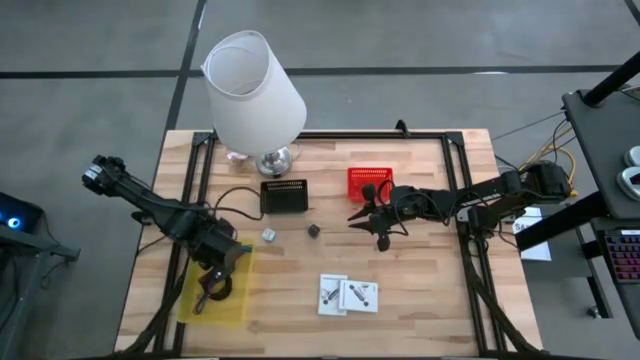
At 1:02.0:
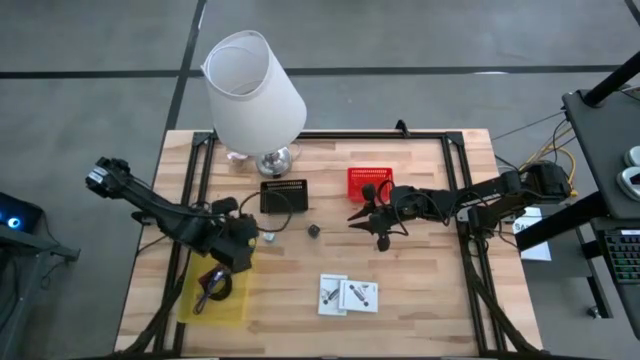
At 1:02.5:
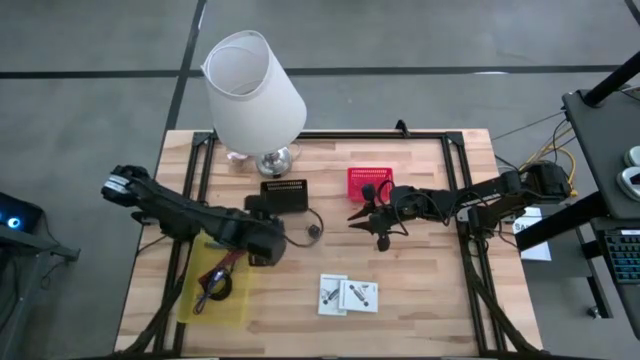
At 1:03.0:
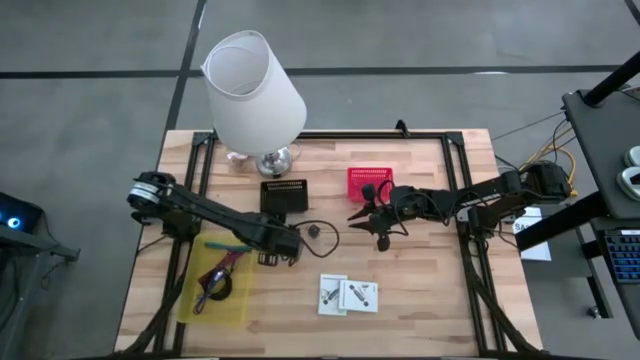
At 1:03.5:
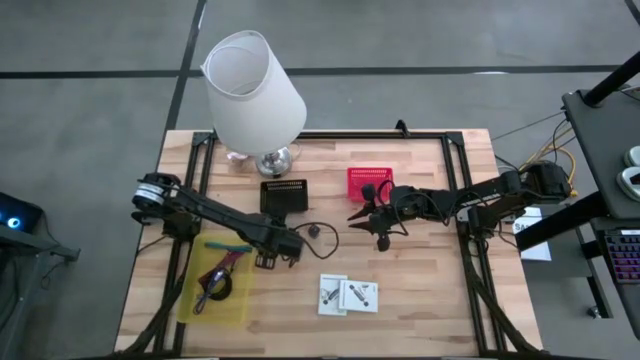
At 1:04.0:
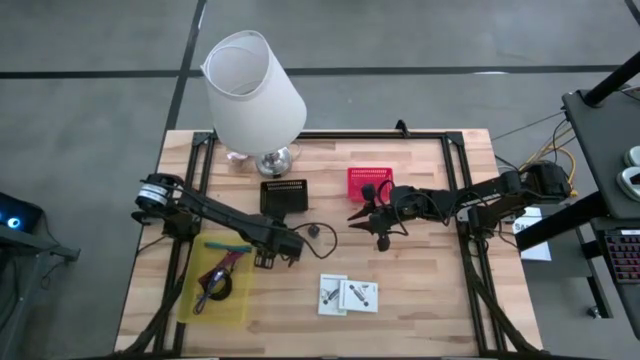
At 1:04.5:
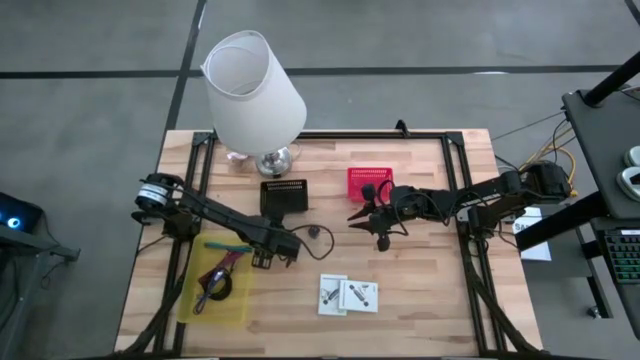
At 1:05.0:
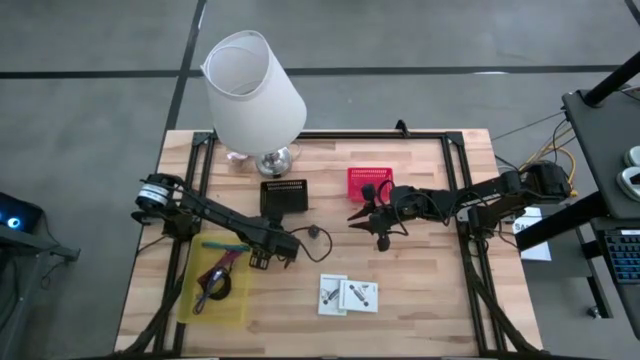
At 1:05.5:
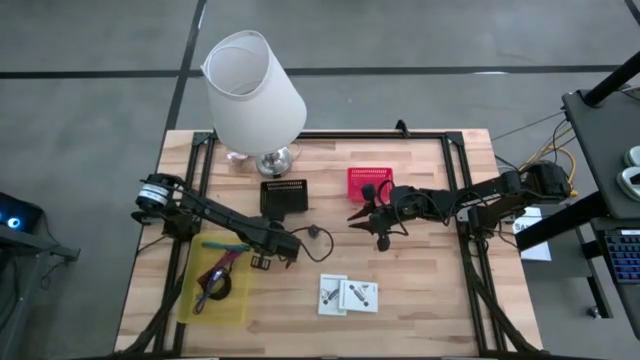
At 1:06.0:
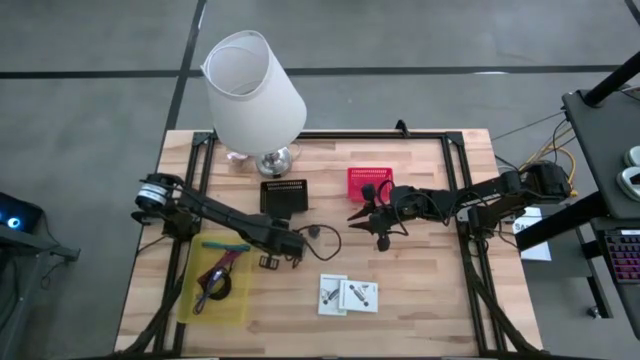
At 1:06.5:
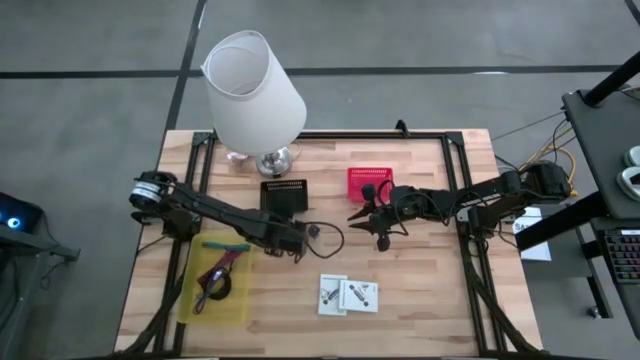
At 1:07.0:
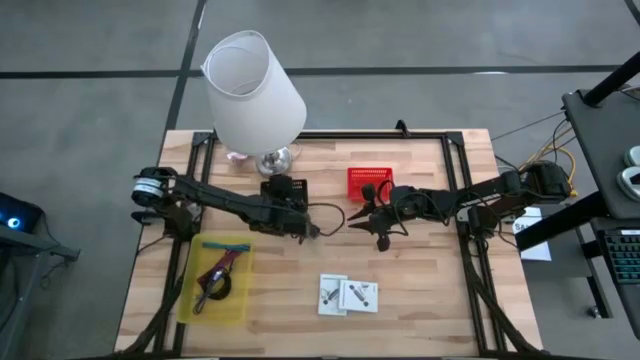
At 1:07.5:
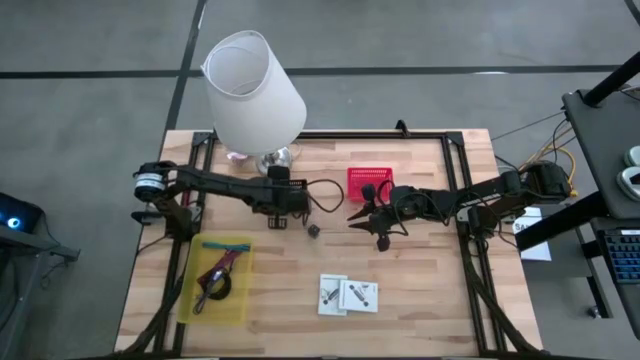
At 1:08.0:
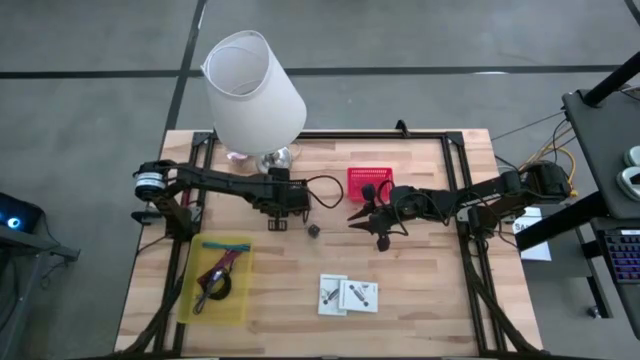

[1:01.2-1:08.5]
Task: Pick and place items into bin
Put the blue charger adapter into the black bin

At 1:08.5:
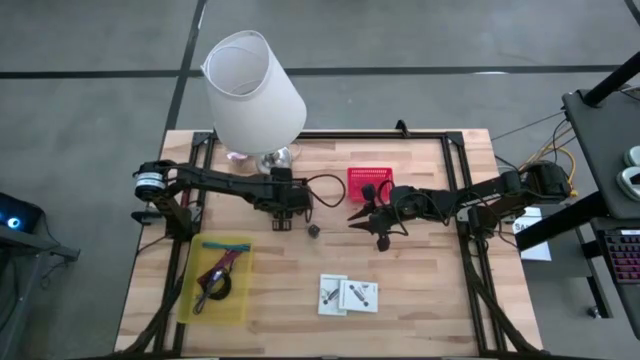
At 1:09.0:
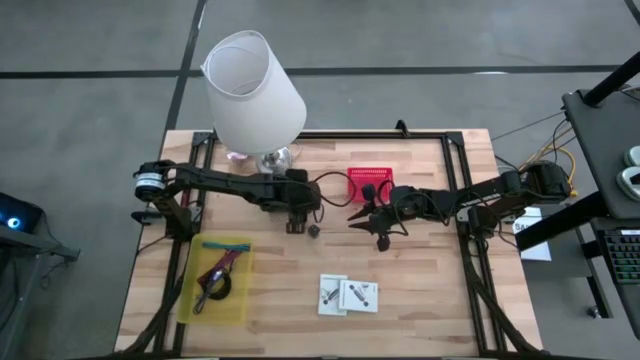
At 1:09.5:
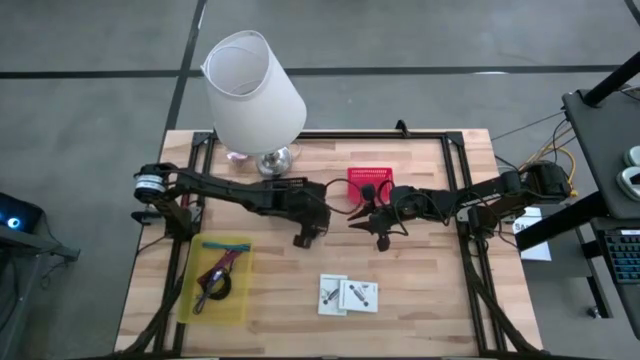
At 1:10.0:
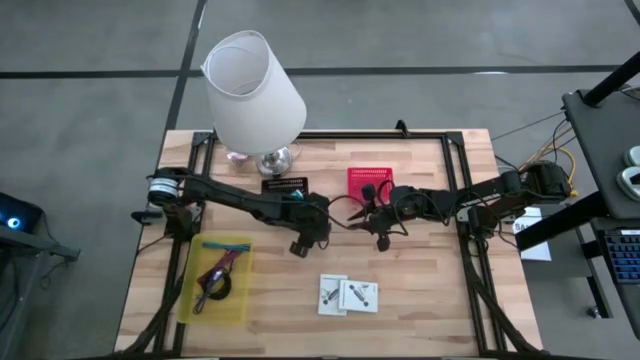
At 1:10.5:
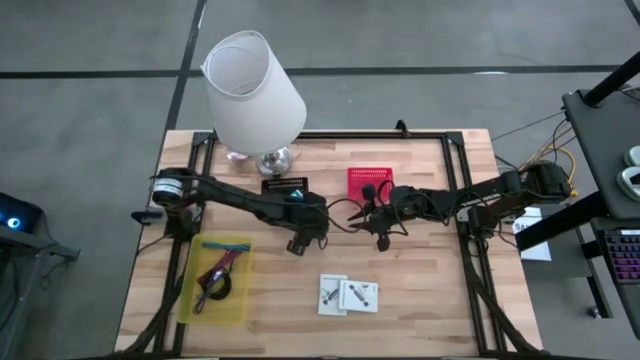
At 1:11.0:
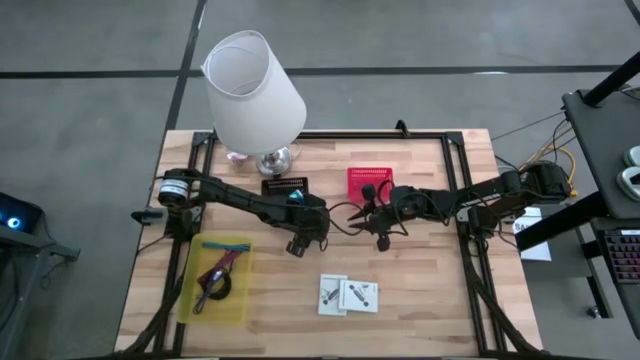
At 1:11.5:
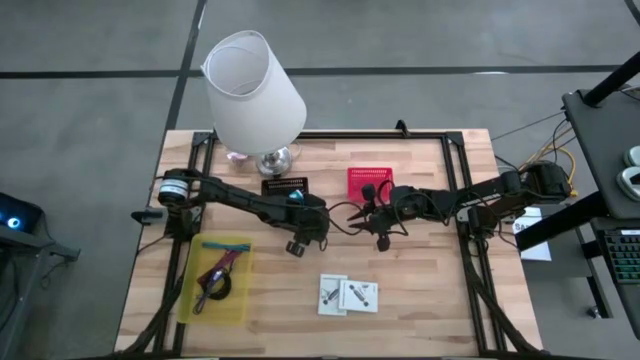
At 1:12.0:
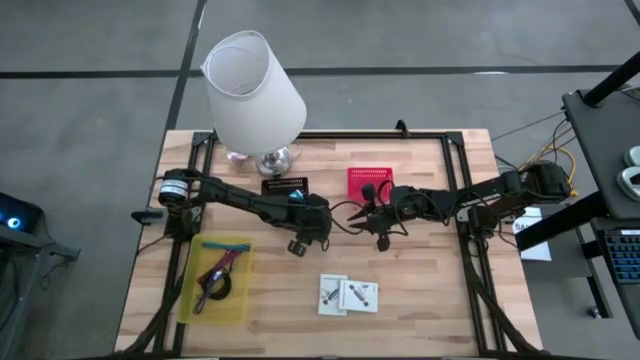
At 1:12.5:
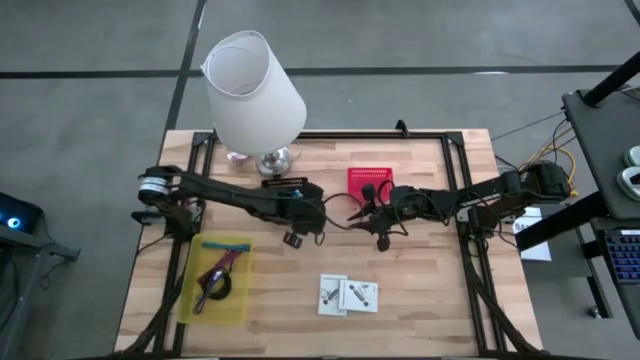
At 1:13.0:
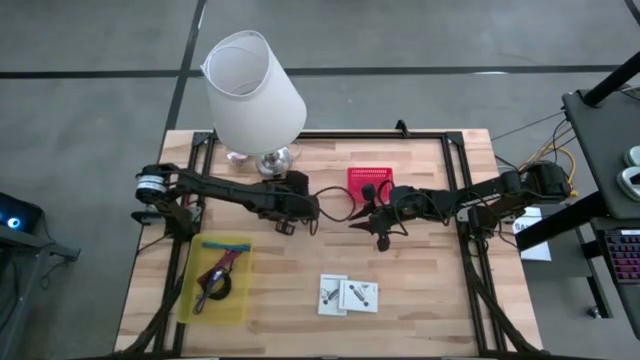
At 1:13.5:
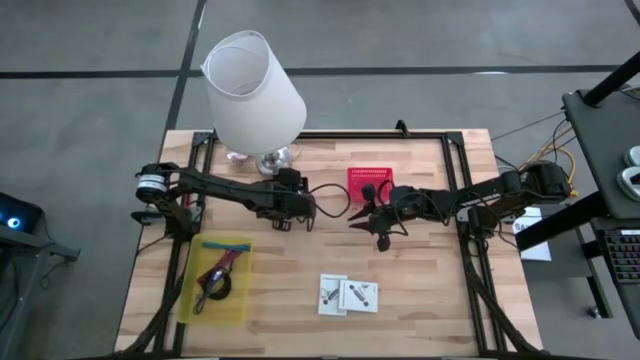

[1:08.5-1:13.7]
Put the black charger adapter into the black bin

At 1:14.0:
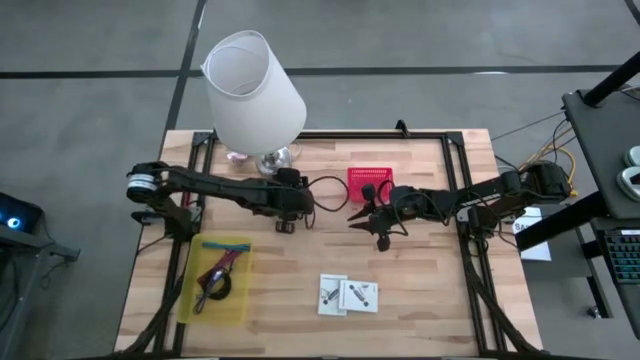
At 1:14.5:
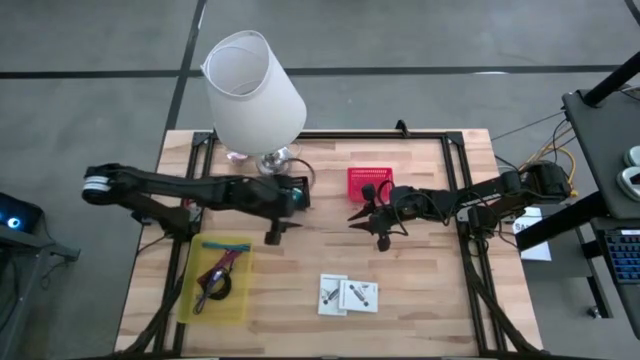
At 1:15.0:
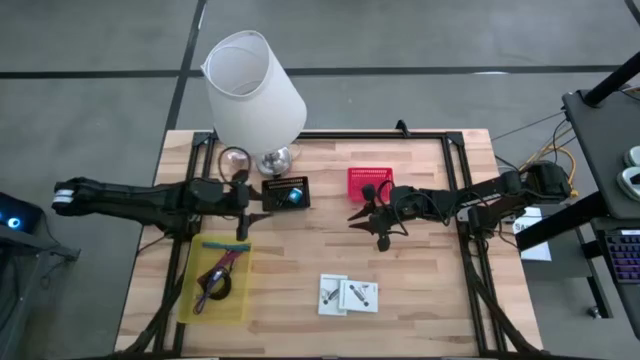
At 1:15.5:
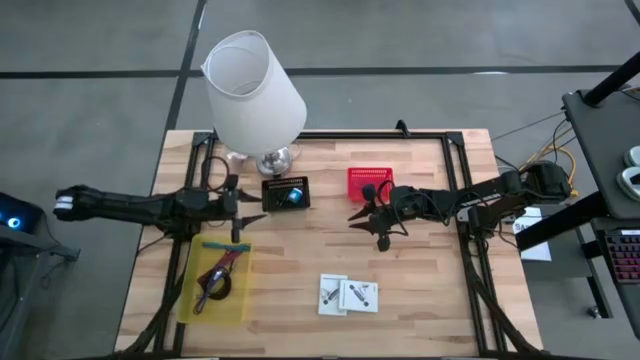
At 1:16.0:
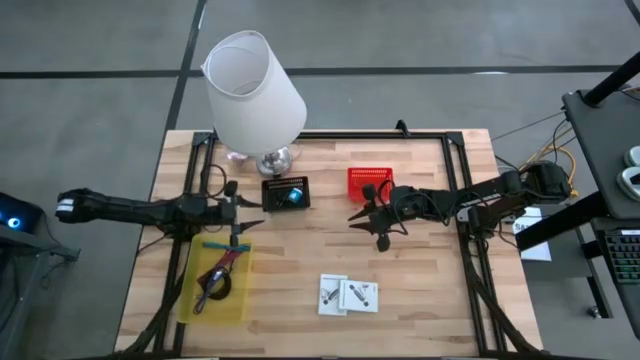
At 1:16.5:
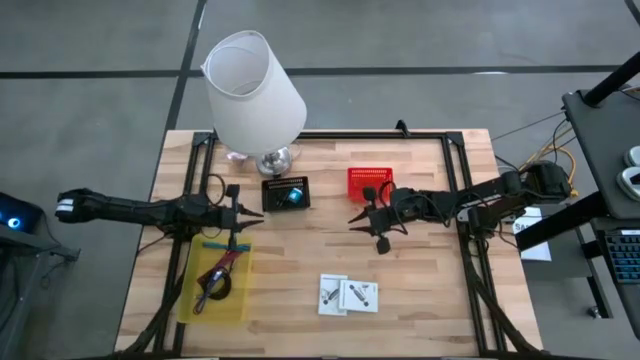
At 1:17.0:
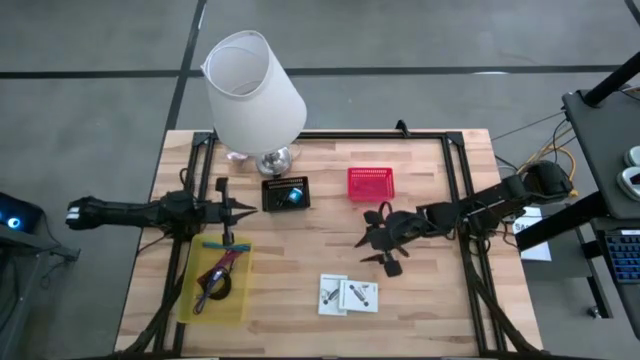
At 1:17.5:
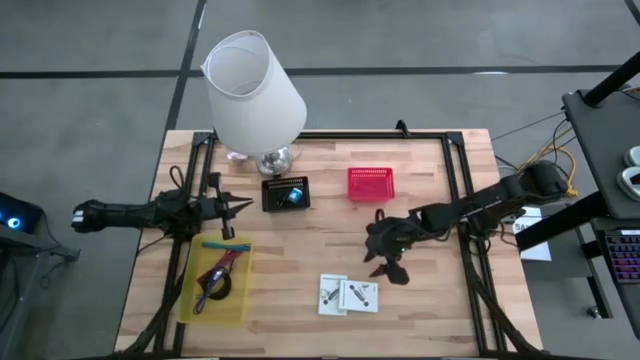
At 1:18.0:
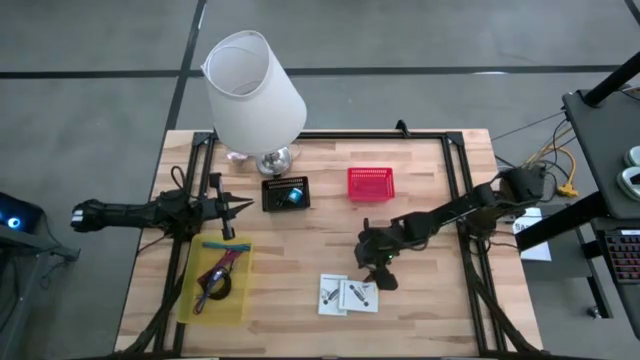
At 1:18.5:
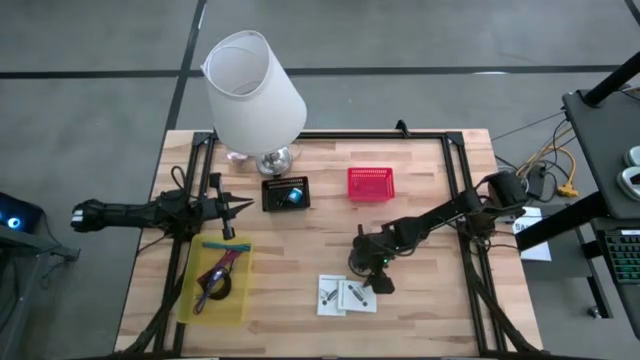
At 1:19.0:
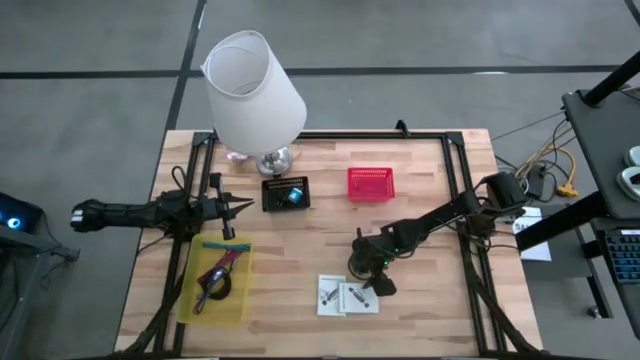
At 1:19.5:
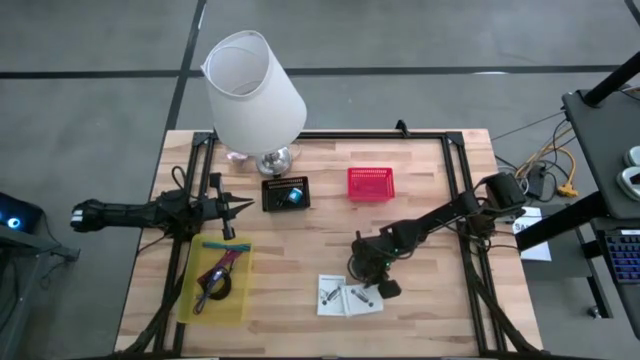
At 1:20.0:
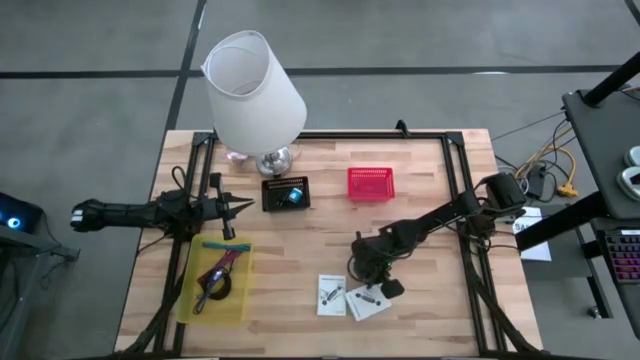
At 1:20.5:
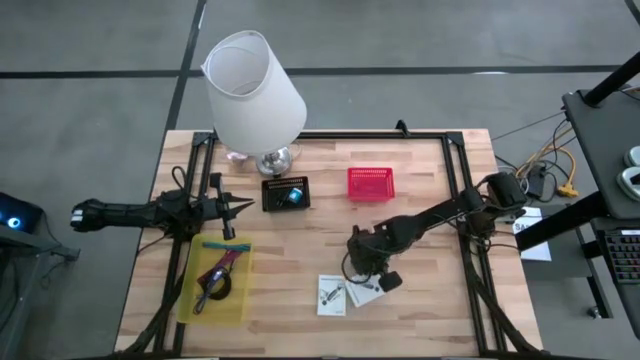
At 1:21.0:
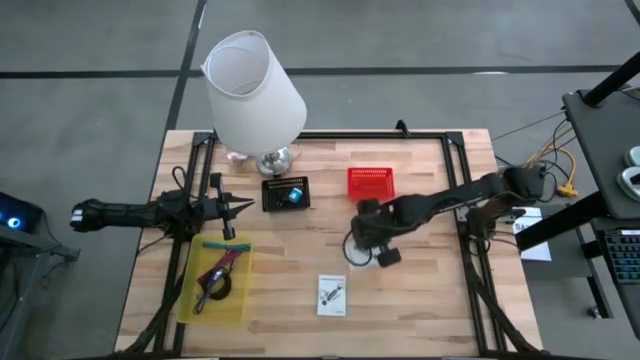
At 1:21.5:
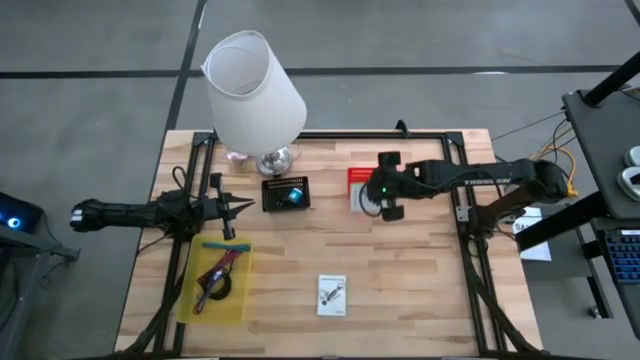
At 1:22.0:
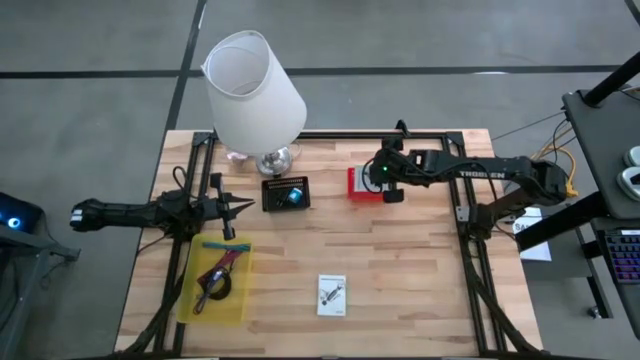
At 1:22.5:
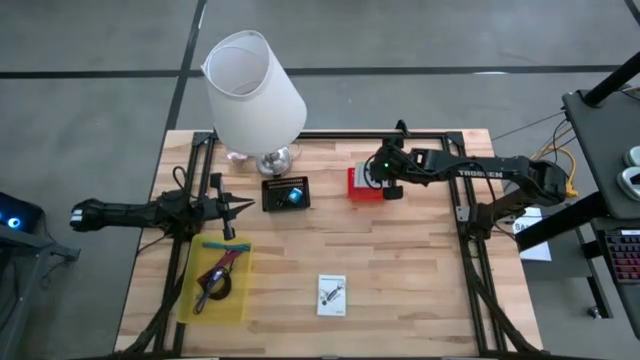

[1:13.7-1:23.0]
Put the right card reader box into the red bin
